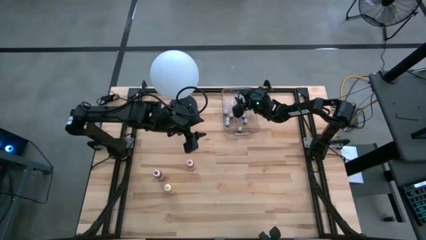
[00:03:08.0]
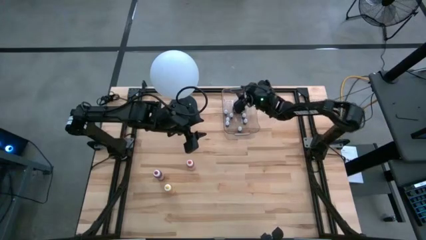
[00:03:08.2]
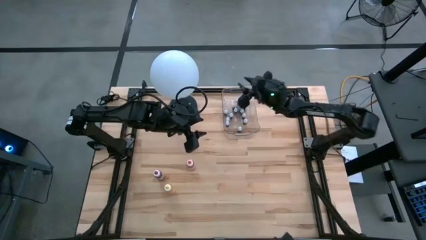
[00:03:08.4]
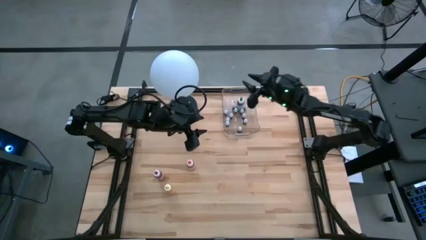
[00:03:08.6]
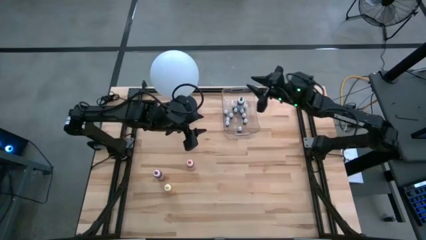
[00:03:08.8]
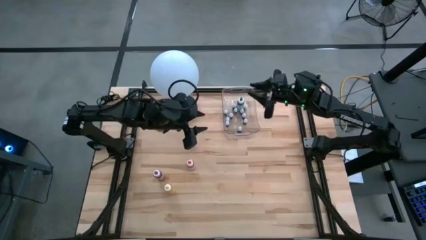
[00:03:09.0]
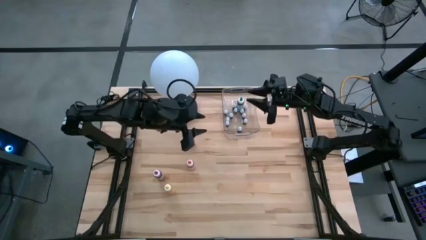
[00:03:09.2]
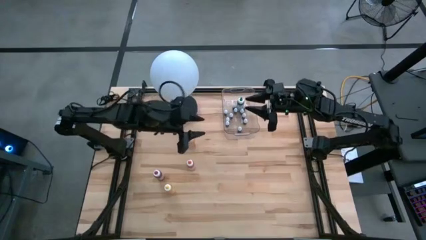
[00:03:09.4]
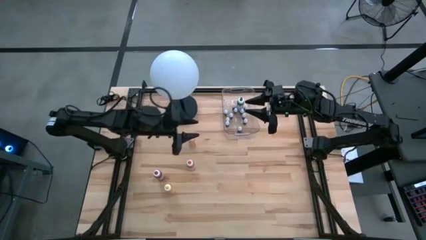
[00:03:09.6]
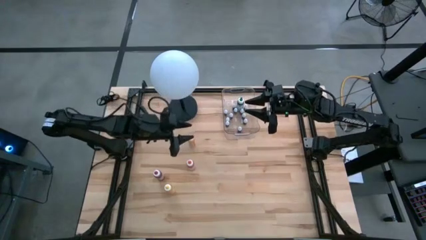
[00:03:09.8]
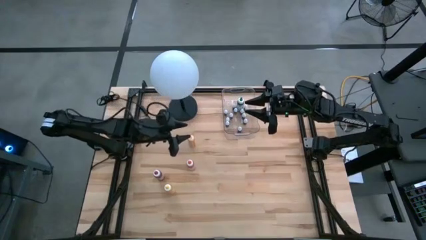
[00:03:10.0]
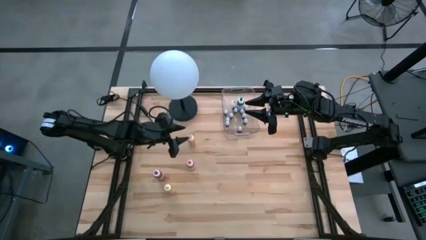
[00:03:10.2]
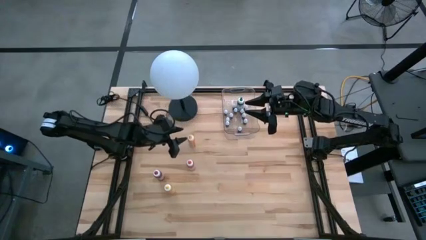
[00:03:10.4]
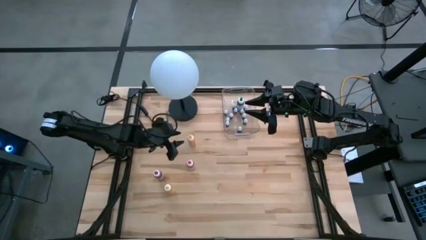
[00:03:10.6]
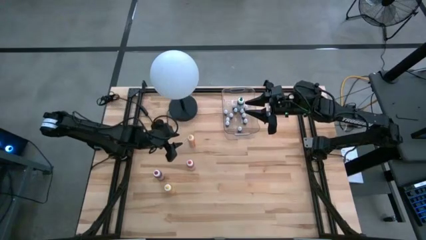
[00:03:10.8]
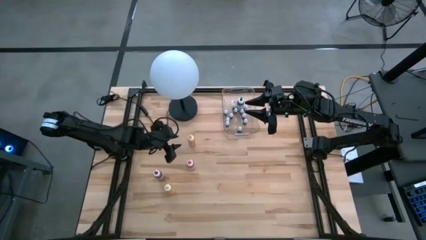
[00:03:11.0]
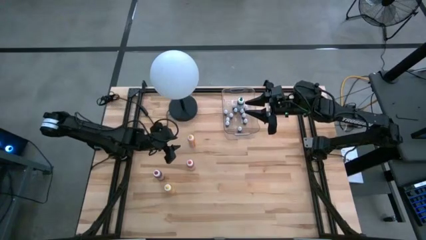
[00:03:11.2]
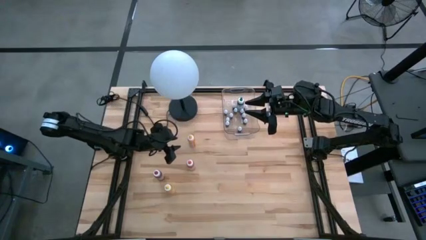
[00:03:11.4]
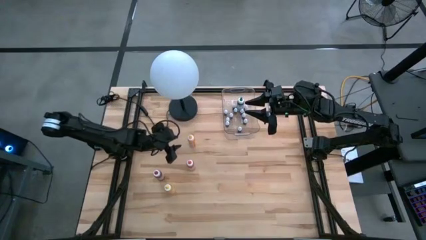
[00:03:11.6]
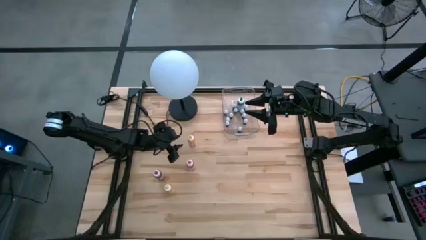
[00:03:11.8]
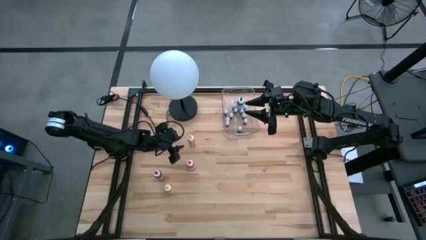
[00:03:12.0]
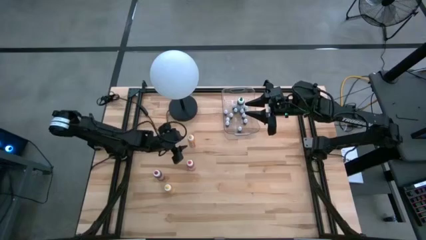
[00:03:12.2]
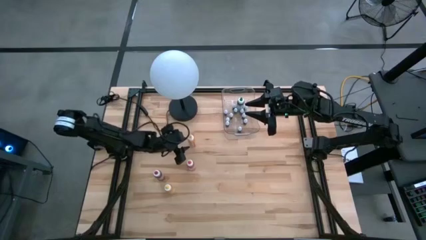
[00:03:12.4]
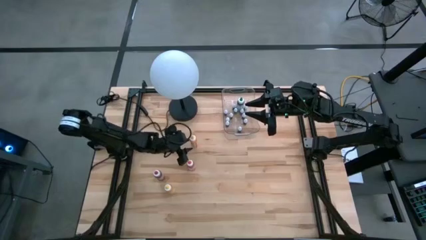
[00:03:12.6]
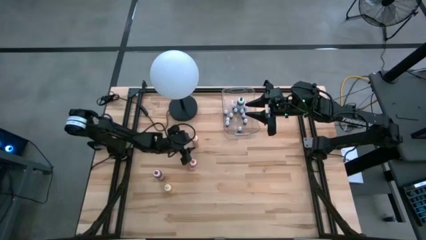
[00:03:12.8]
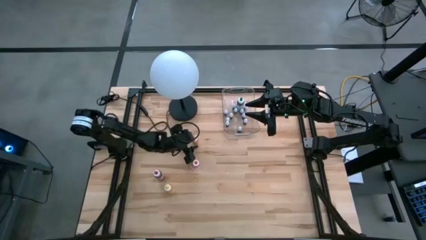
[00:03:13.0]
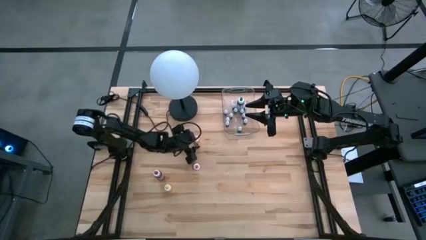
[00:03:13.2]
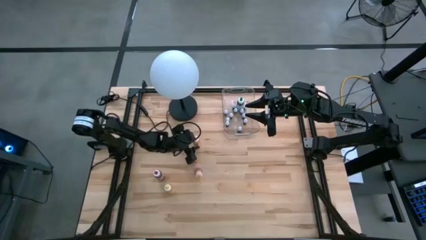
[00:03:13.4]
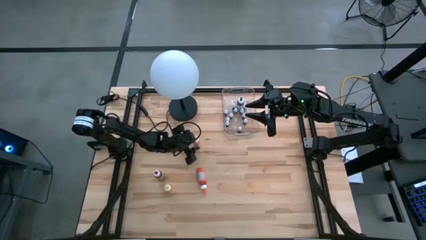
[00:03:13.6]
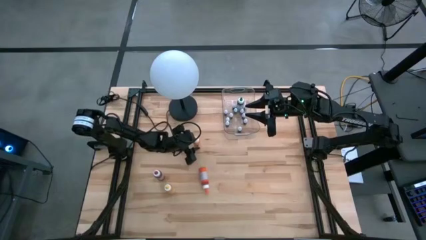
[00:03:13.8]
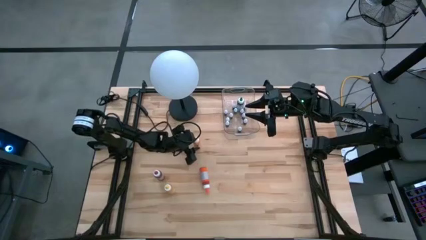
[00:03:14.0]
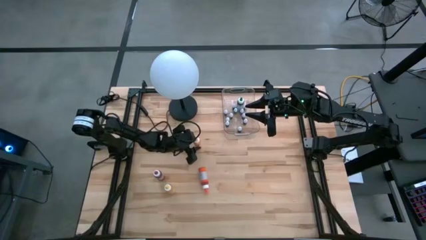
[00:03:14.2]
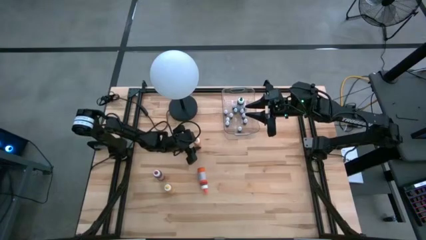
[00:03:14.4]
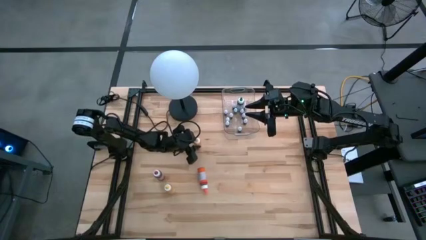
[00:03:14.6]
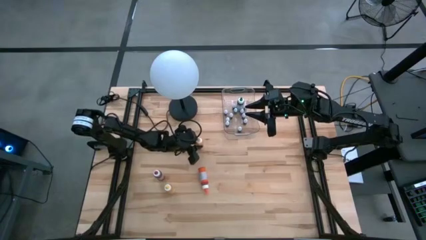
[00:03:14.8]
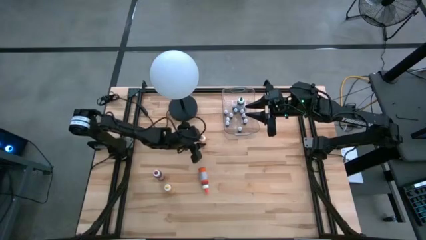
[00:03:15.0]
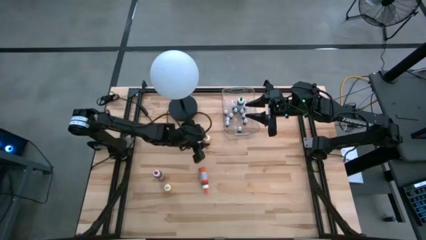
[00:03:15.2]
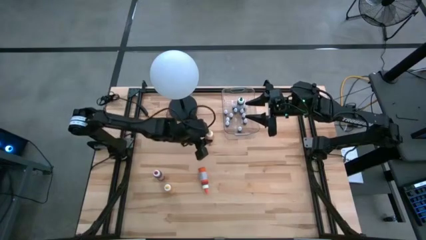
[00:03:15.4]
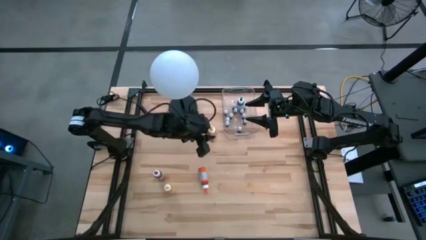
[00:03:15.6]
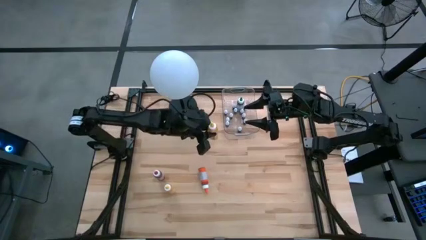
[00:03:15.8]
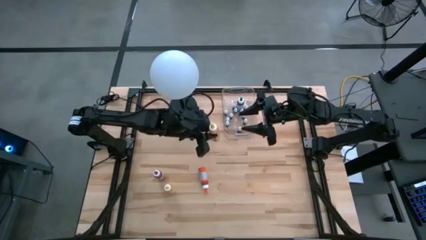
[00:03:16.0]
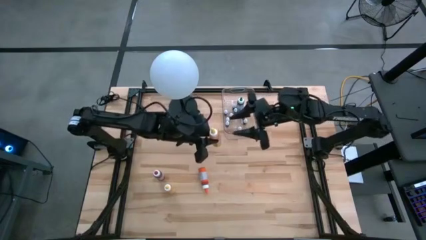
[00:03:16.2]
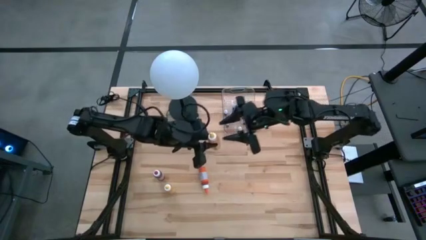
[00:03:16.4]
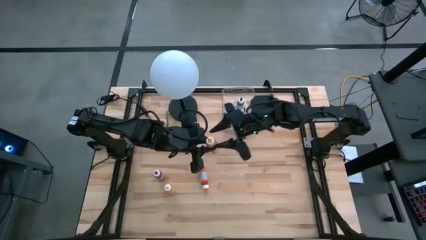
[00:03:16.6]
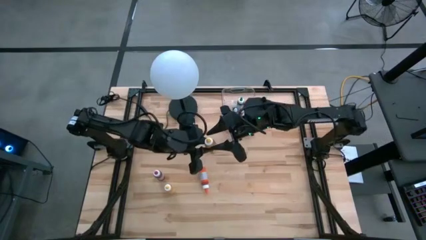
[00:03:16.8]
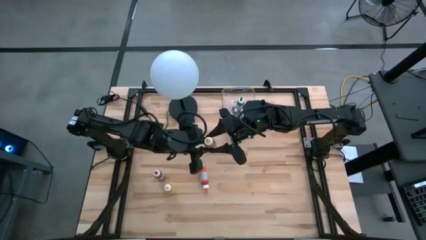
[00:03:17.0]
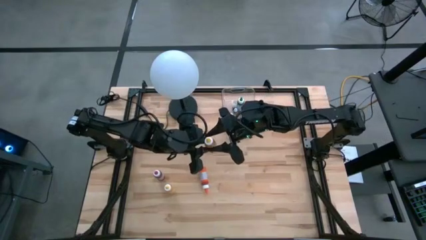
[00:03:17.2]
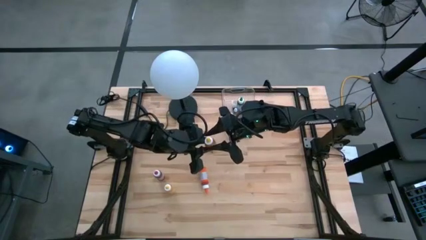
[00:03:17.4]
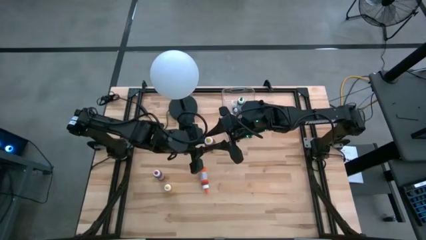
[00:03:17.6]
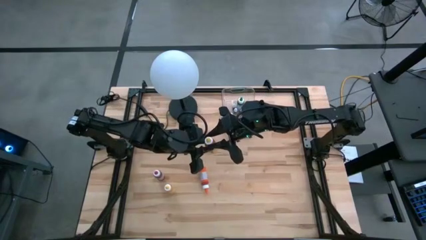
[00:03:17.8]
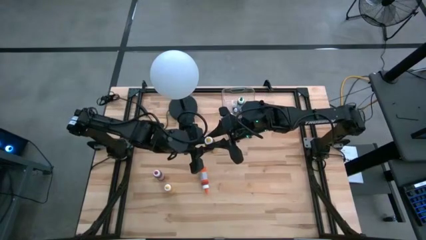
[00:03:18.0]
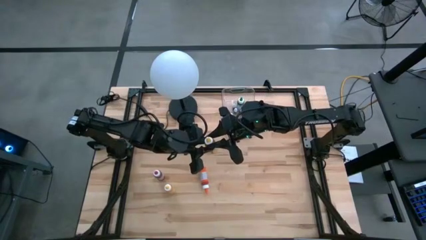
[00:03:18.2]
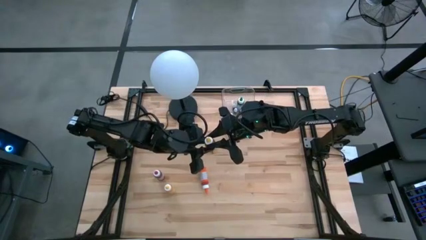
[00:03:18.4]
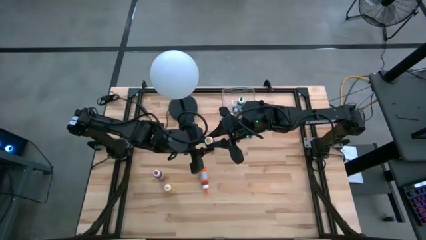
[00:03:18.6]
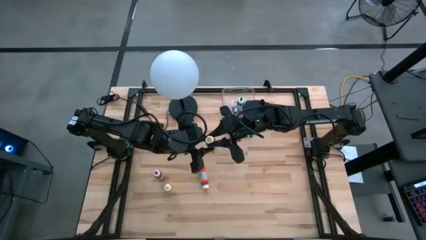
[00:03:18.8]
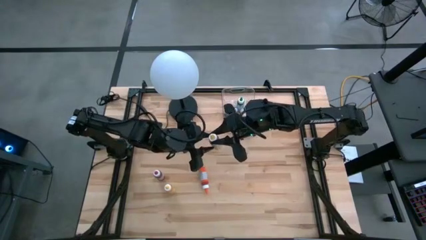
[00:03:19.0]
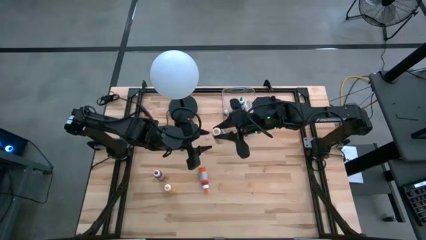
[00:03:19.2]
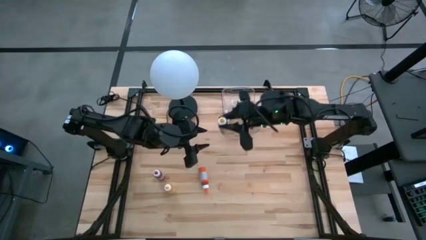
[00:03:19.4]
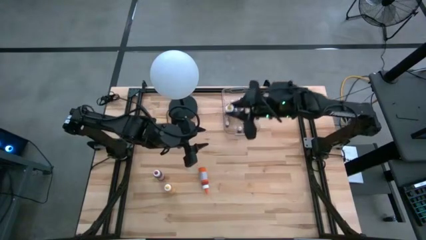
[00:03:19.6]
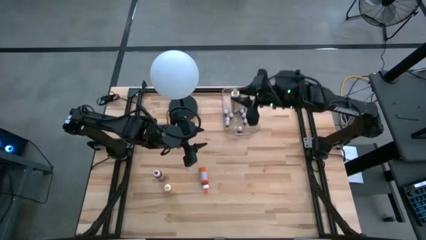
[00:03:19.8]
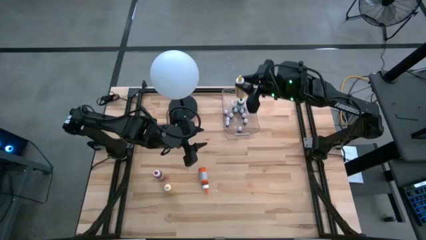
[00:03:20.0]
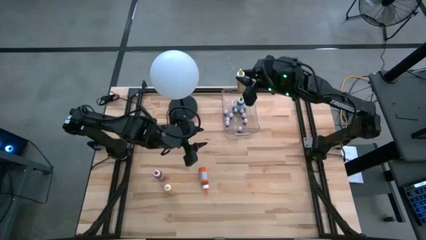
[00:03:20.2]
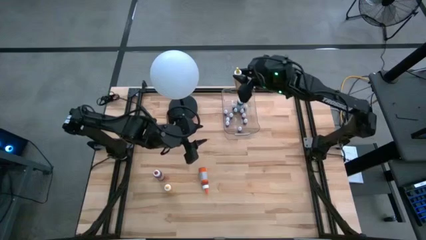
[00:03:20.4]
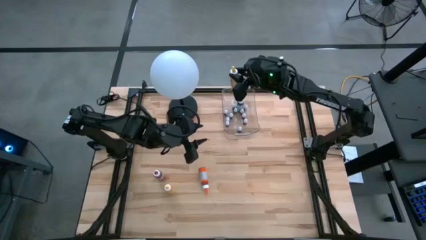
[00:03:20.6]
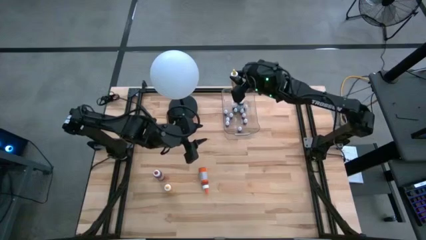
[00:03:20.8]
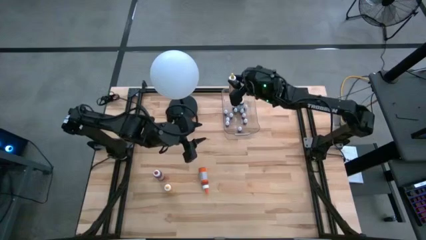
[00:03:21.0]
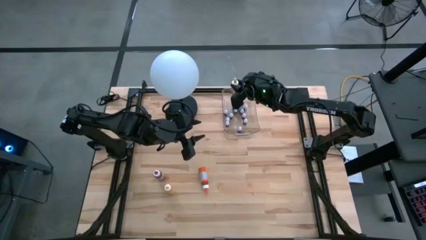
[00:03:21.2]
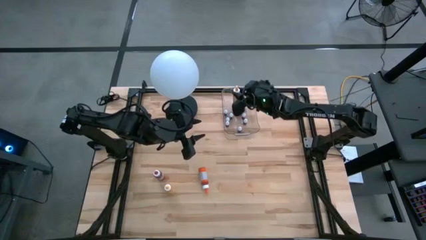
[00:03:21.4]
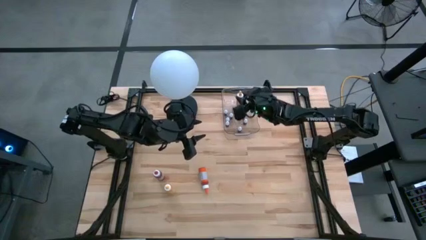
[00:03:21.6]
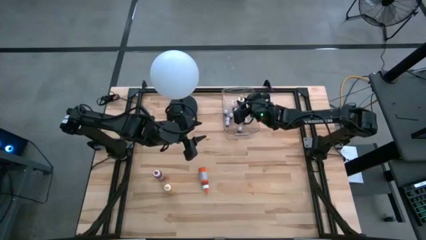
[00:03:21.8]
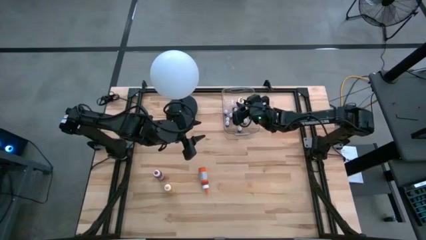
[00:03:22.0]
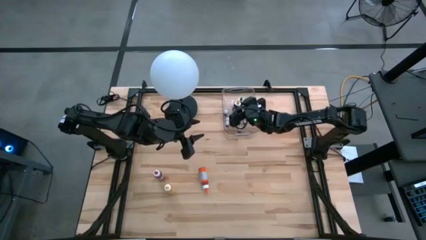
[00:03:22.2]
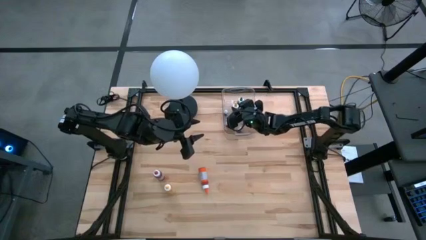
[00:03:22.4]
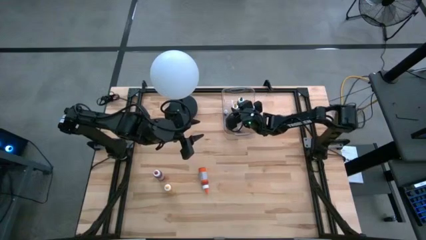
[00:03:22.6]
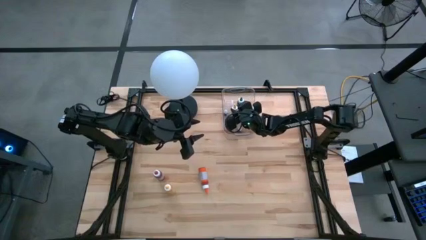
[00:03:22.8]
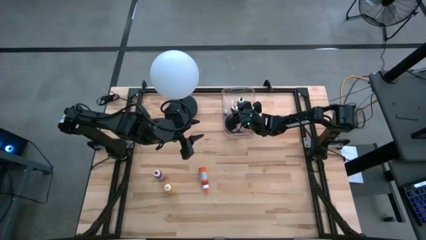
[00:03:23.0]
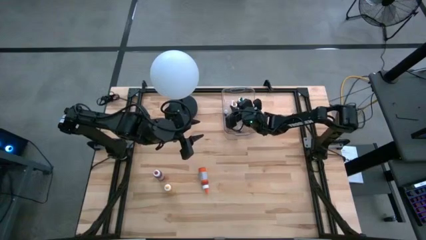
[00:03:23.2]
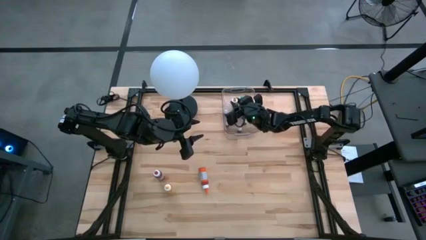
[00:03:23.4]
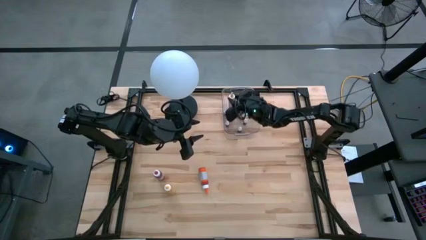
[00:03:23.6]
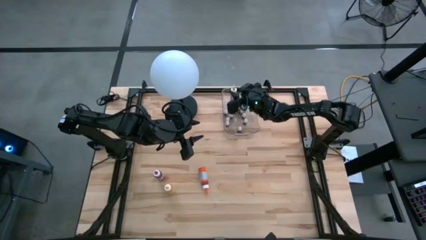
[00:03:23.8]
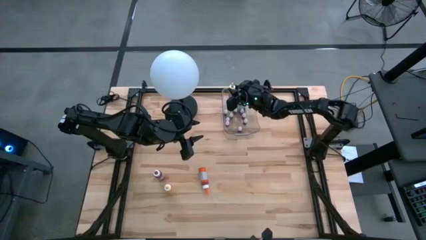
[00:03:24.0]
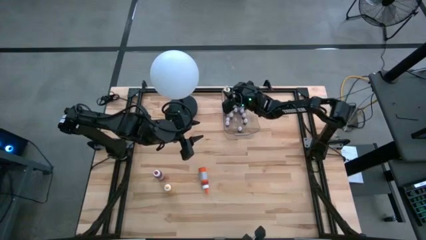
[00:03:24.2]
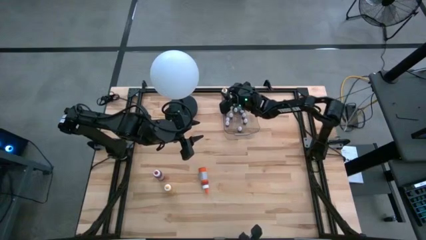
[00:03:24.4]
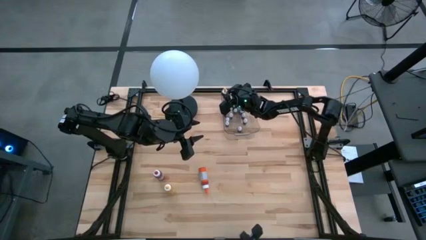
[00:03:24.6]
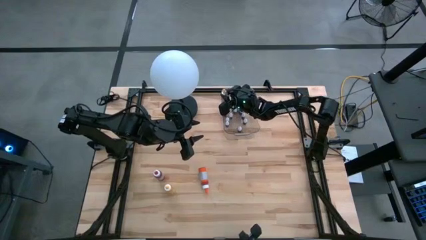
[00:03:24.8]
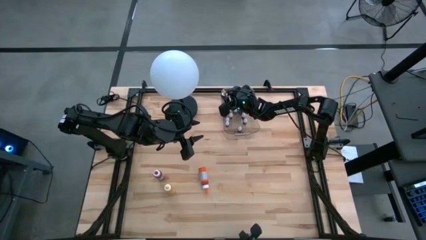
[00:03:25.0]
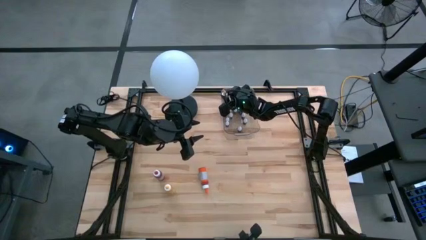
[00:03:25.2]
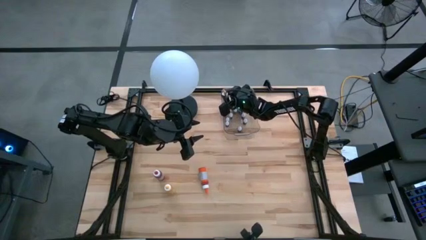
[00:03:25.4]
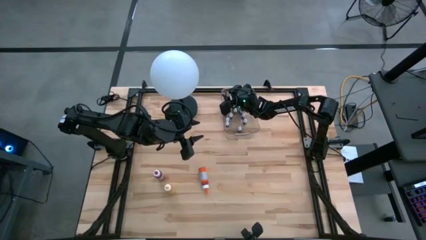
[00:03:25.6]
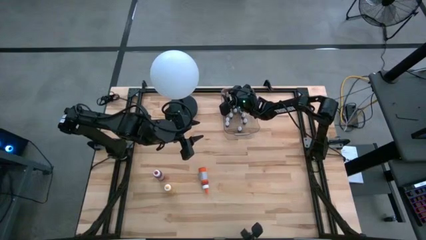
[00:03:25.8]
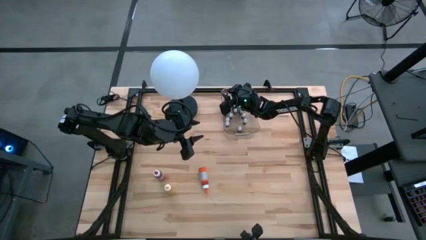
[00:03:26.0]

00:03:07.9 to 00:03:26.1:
Task: Pick & Place food coloring
Put the large yellow food coloring bottle into the transparent bin
